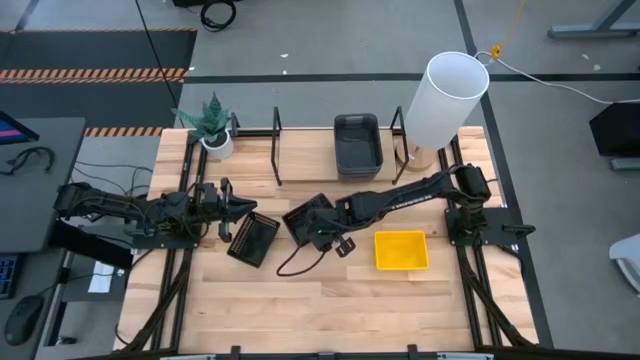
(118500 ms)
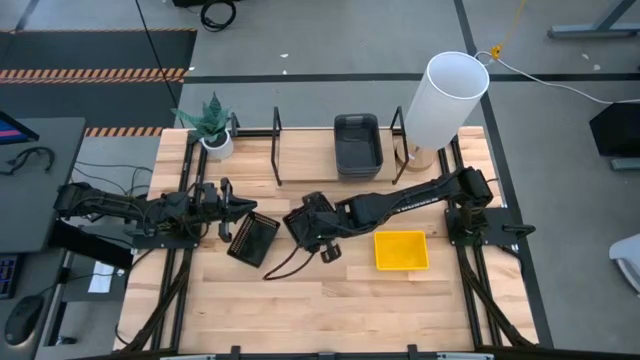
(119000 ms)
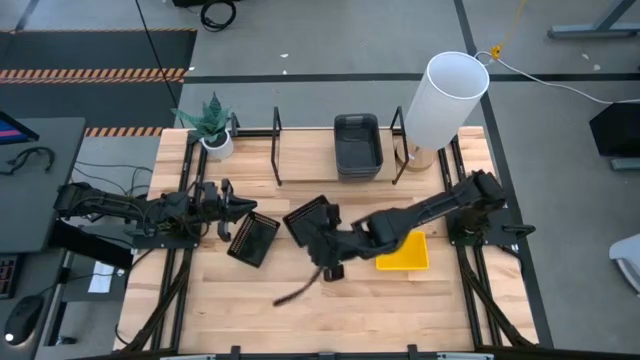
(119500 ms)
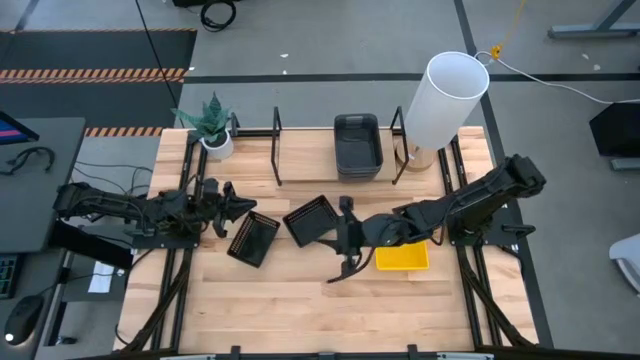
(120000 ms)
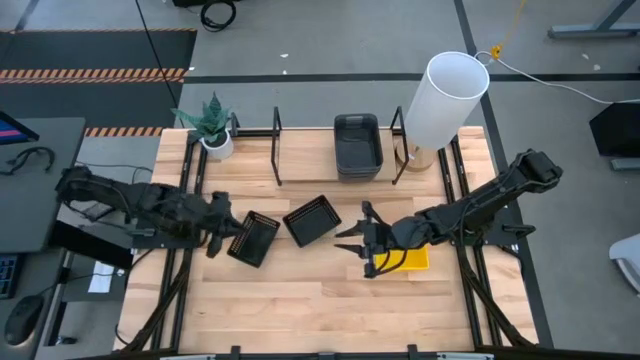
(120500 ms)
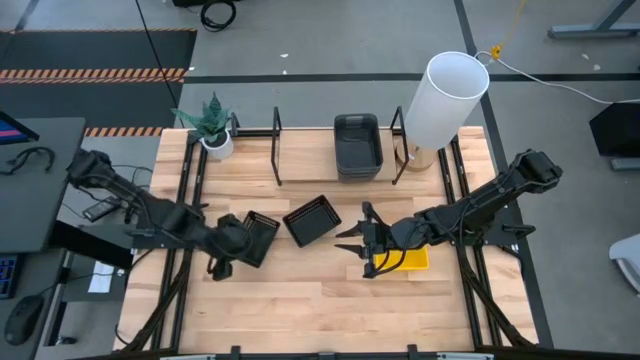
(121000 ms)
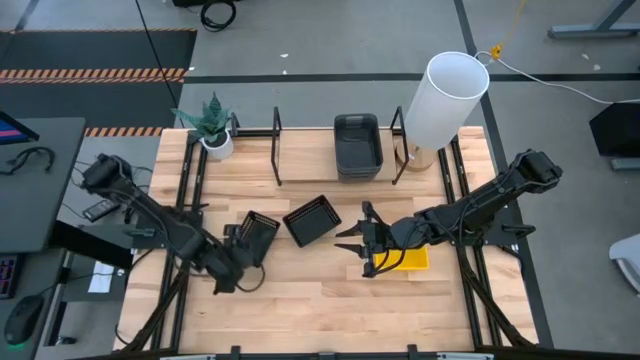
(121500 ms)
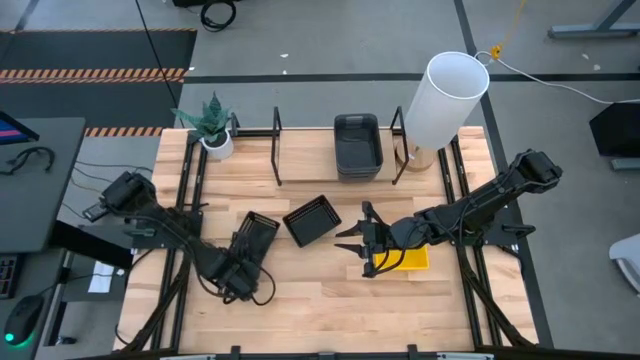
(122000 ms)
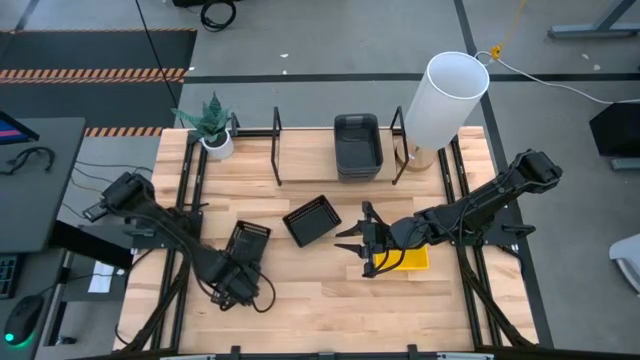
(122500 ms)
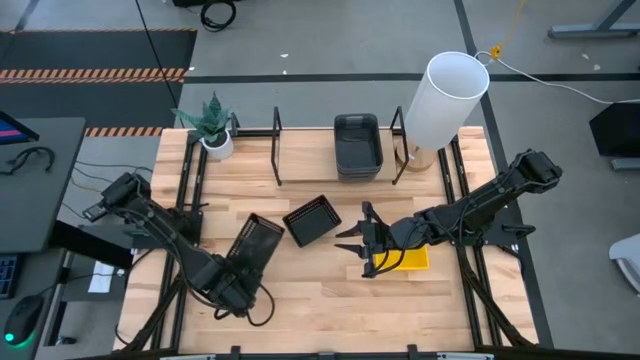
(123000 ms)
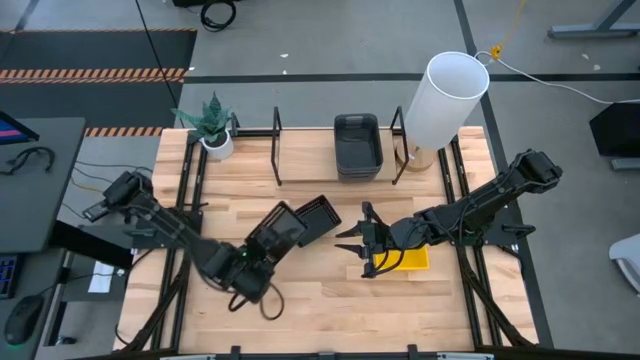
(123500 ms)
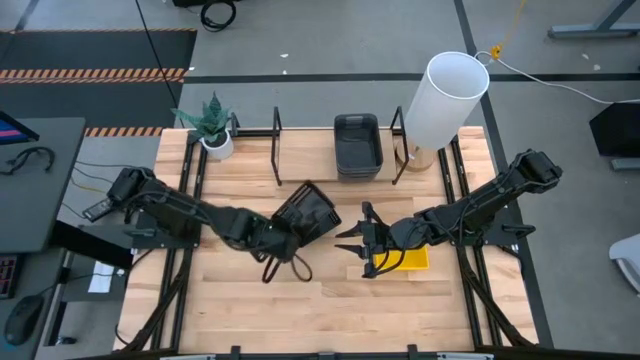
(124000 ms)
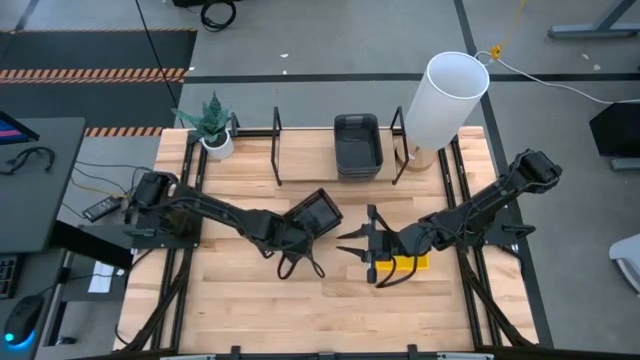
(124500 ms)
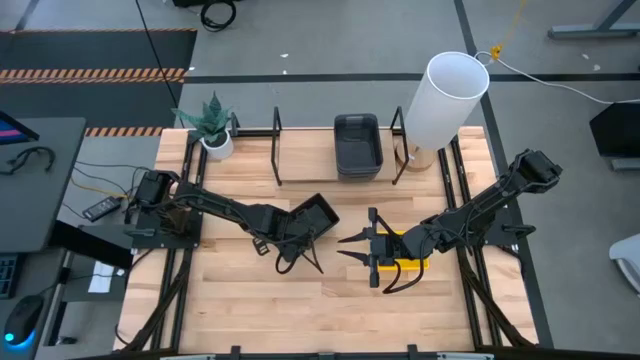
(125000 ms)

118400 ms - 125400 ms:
Task: Stack baskets on shelf by color
Stack the left black bin on the right stacked black bins

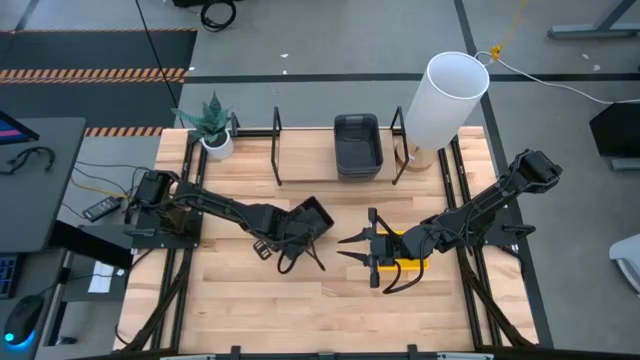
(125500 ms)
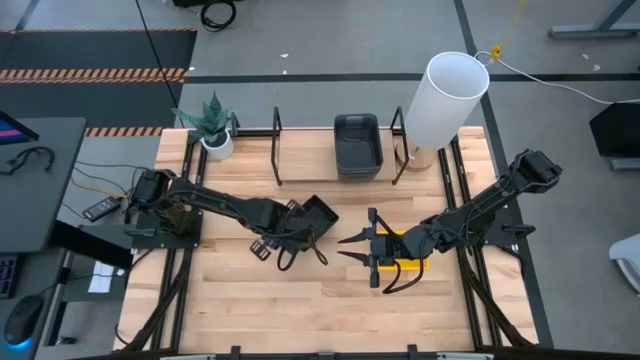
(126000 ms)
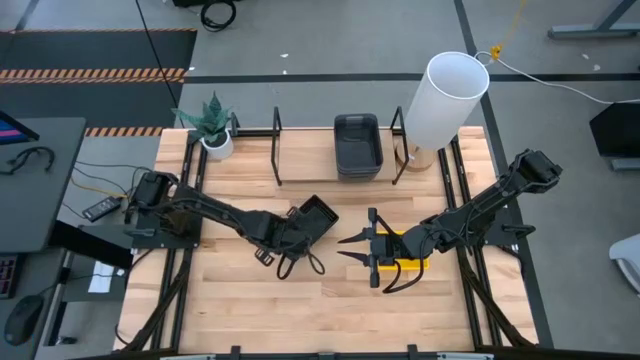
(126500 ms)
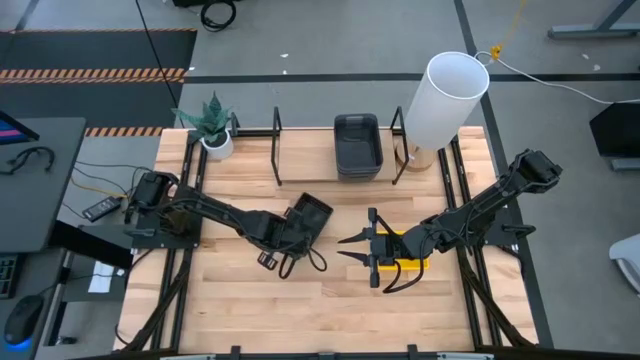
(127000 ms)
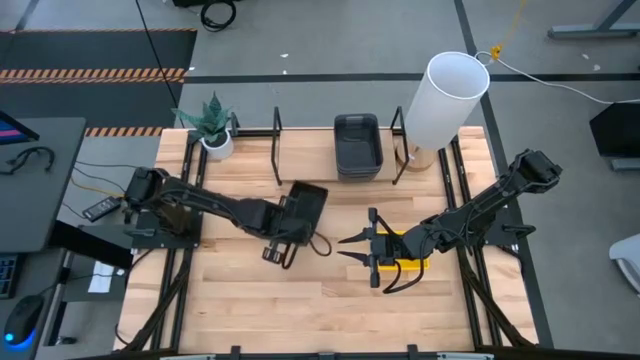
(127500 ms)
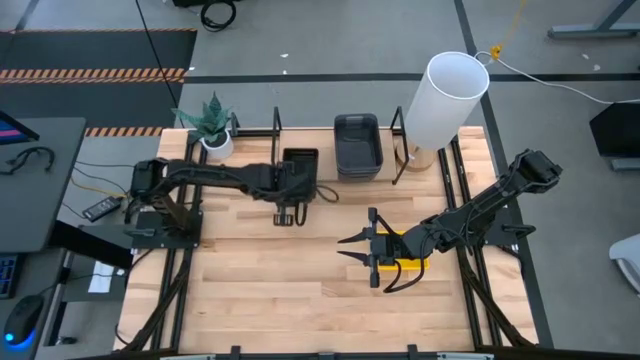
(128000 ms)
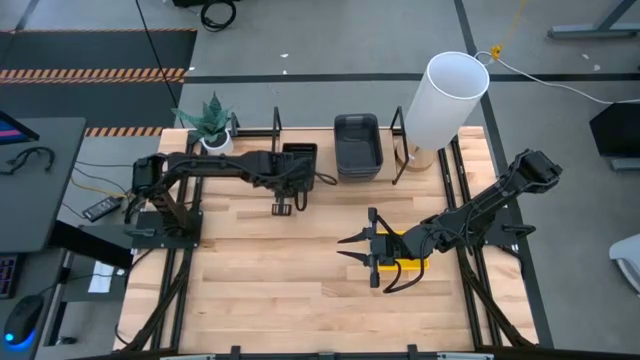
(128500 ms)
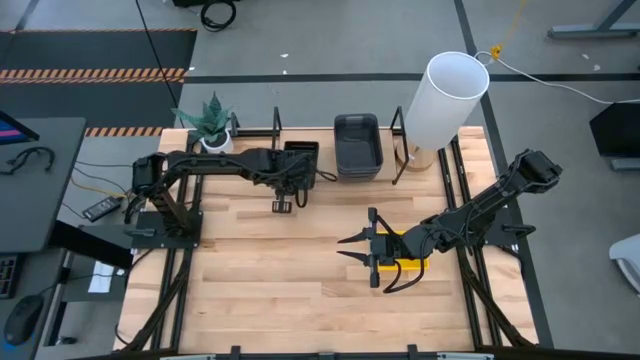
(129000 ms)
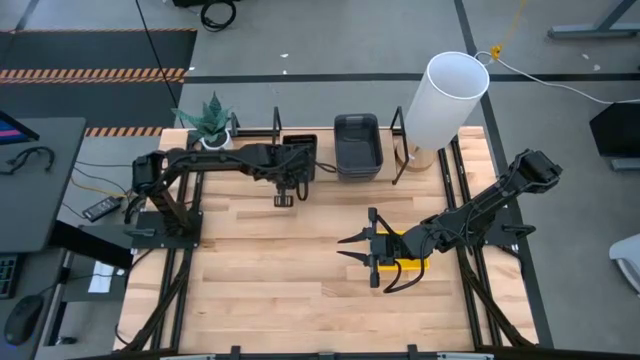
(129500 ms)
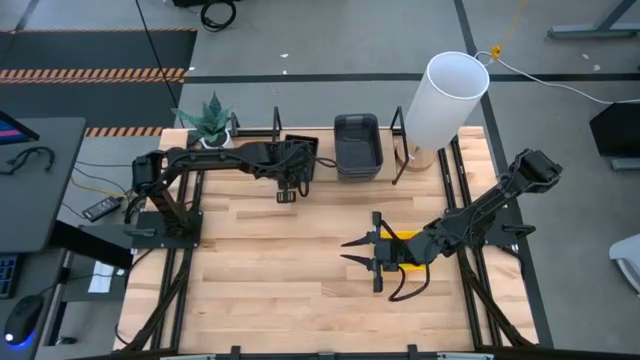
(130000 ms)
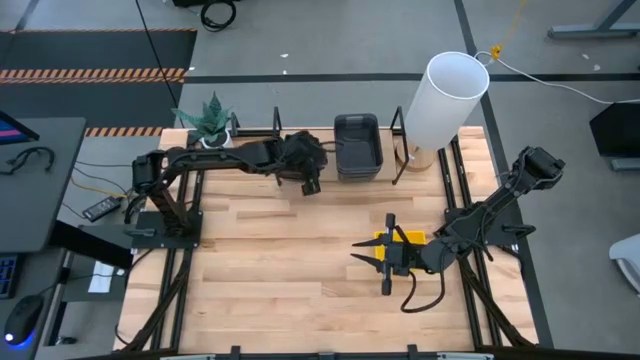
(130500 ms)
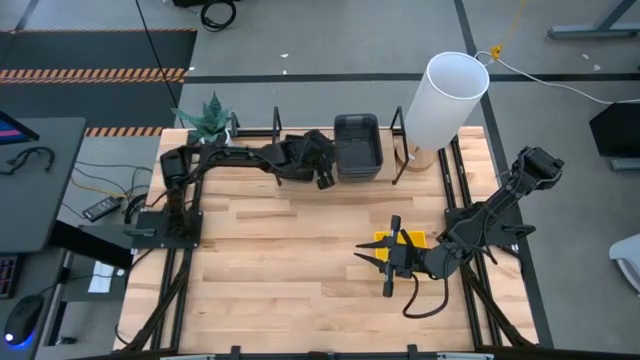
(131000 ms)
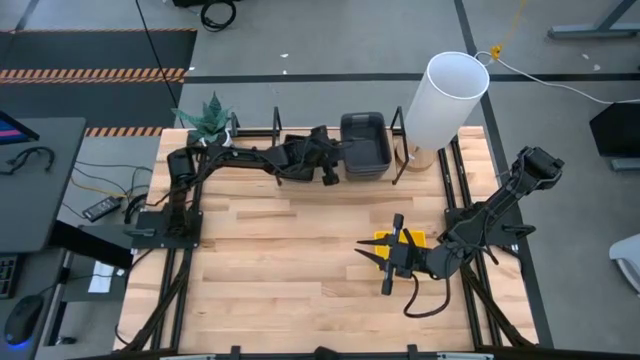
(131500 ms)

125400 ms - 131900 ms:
Put the stacked black bins on the shelf

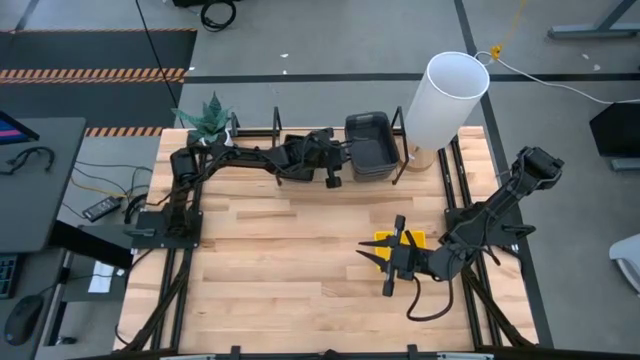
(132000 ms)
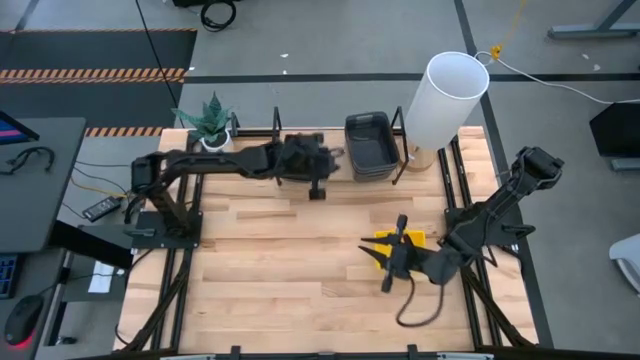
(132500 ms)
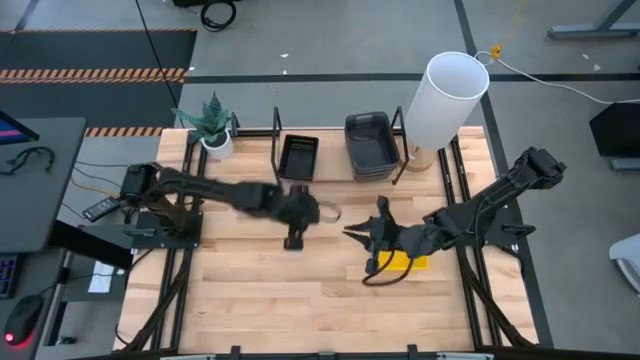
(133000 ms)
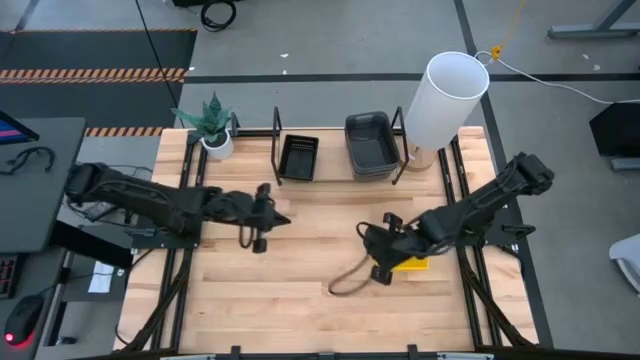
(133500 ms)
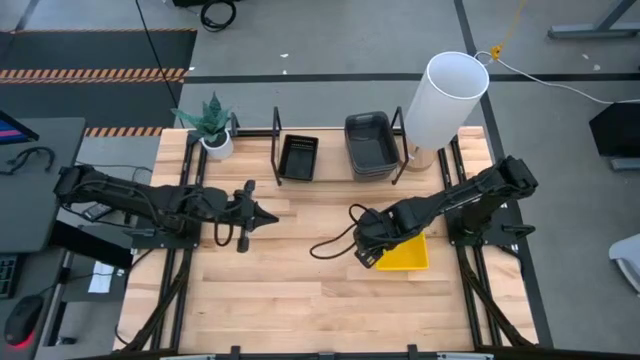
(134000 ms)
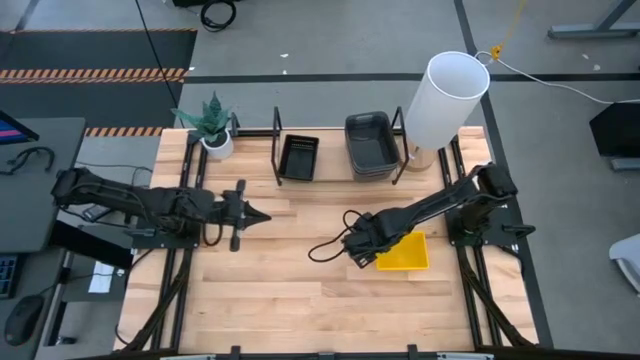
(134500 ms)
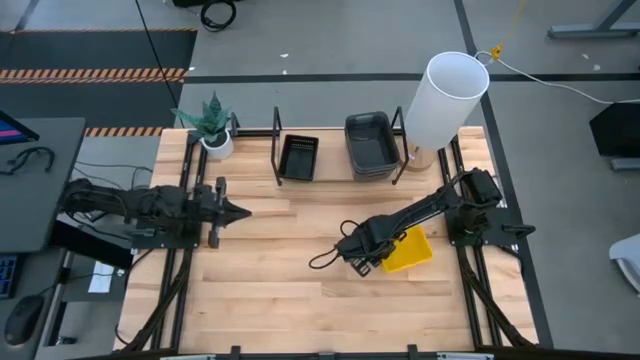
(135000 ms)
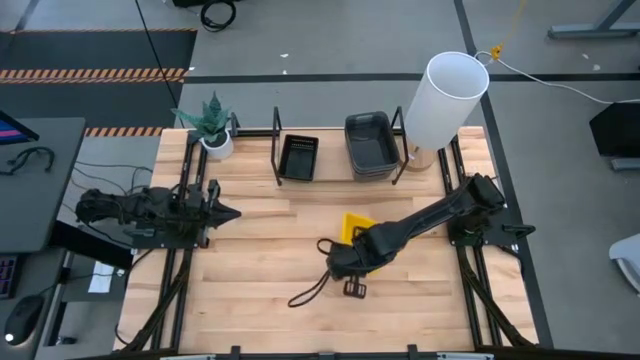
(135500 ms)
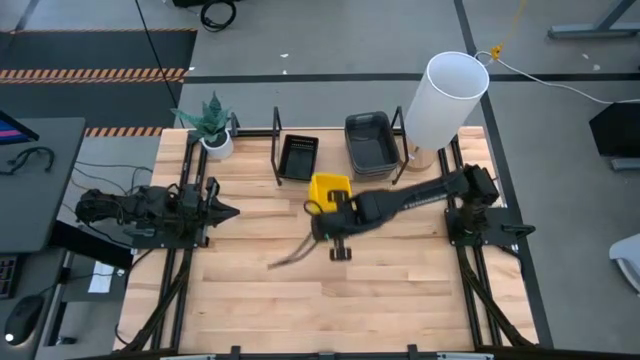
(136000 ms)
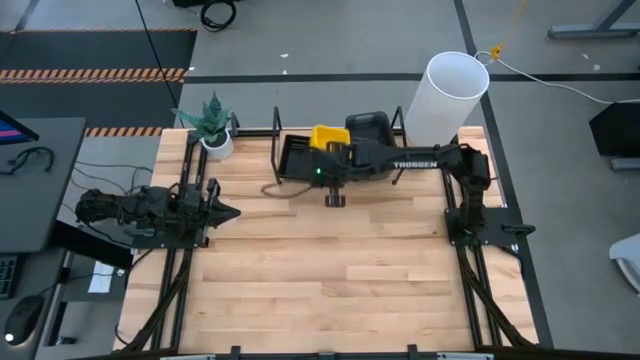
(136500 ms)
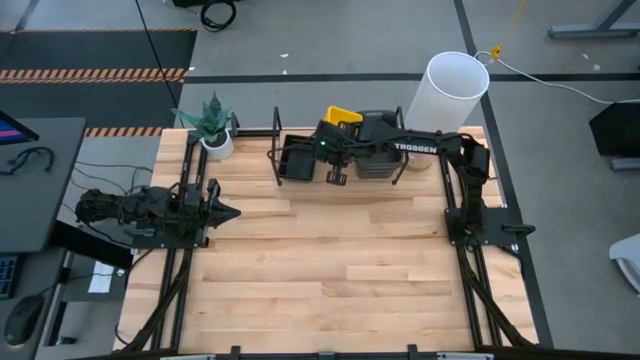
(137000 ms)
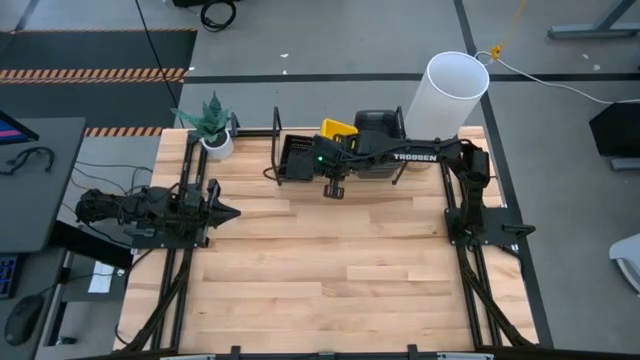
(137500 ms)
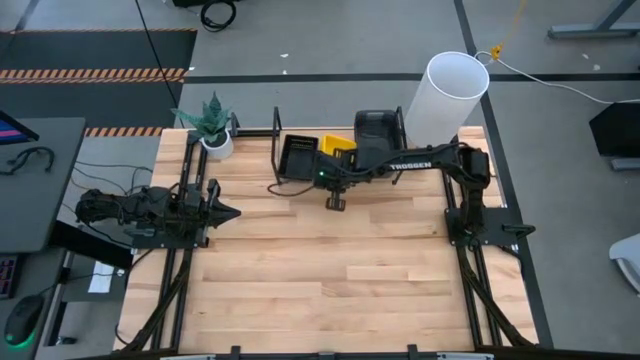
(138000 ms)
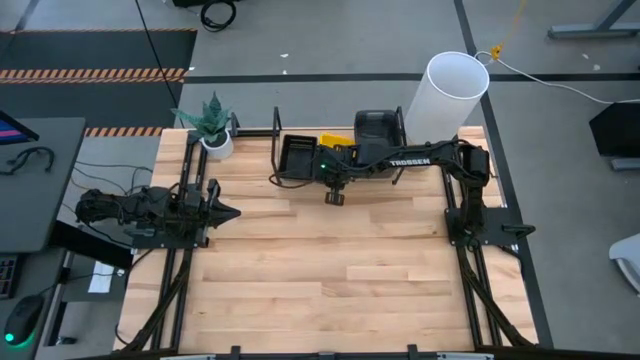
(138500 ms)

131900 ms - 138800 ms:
Put the stacked yellow bins on the shelf
